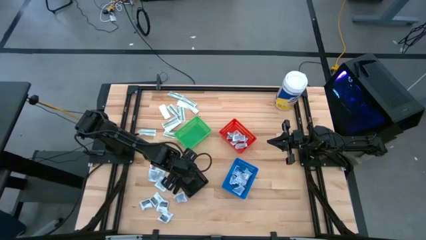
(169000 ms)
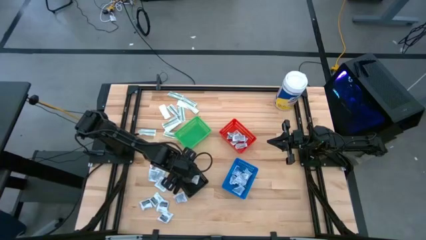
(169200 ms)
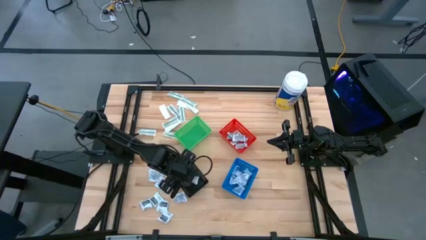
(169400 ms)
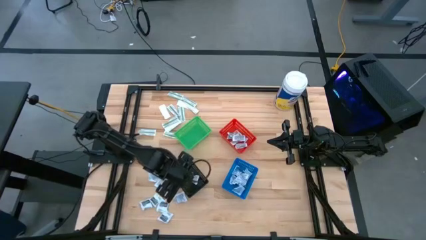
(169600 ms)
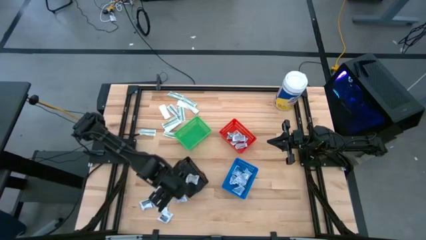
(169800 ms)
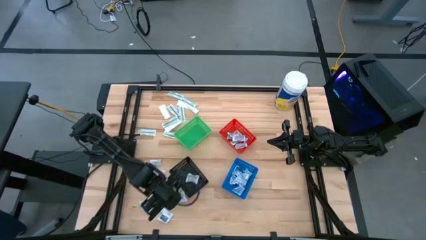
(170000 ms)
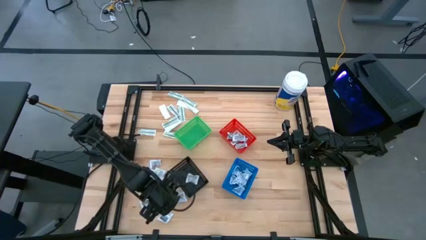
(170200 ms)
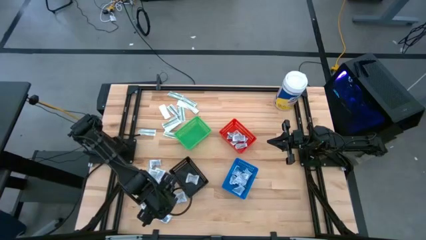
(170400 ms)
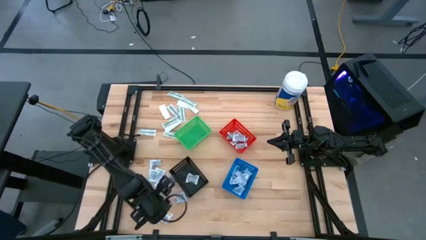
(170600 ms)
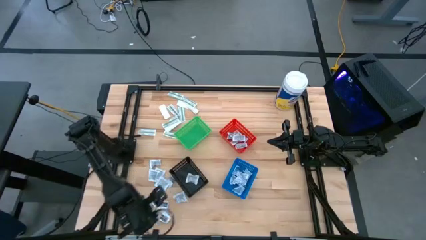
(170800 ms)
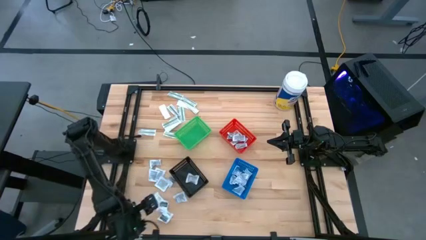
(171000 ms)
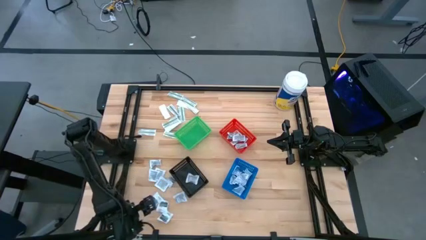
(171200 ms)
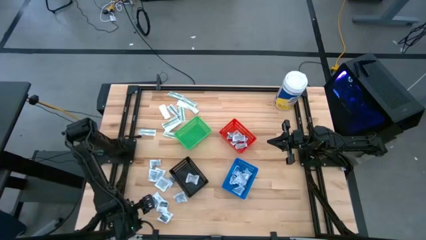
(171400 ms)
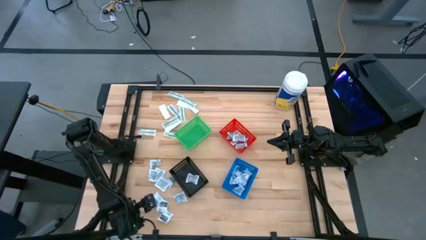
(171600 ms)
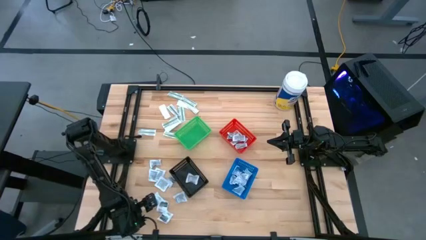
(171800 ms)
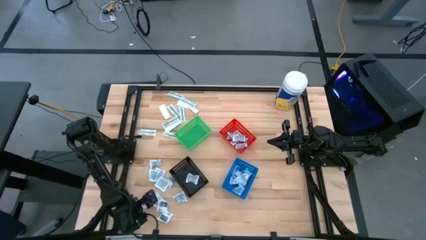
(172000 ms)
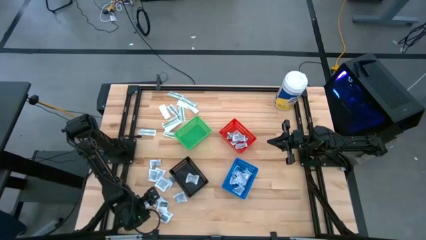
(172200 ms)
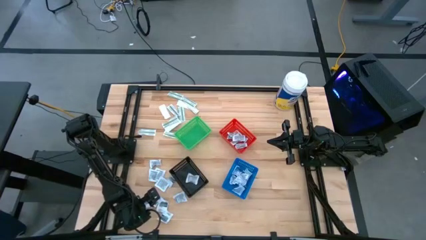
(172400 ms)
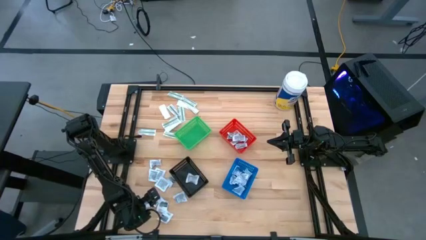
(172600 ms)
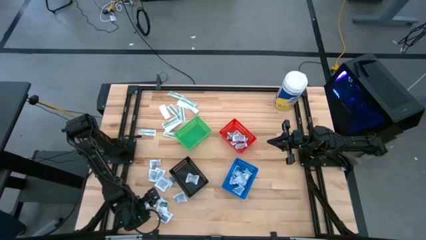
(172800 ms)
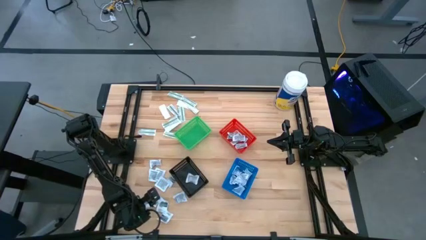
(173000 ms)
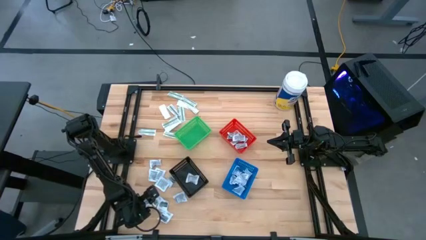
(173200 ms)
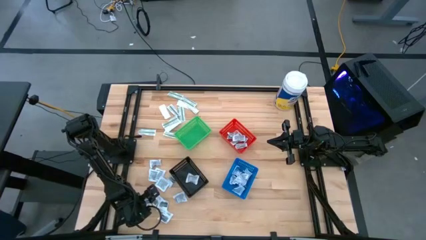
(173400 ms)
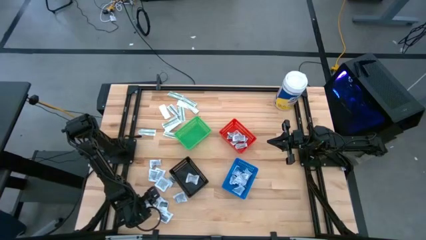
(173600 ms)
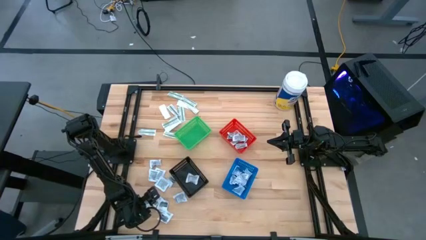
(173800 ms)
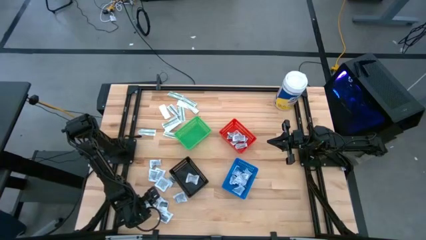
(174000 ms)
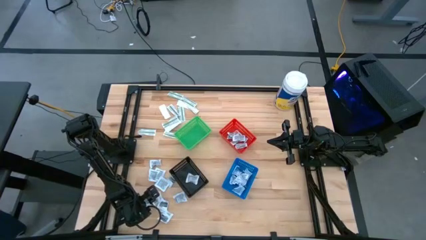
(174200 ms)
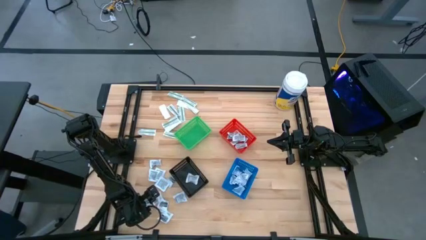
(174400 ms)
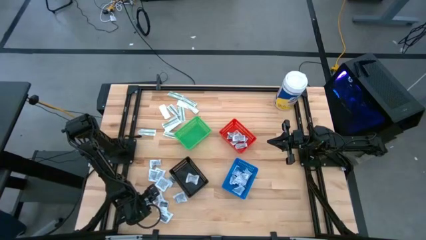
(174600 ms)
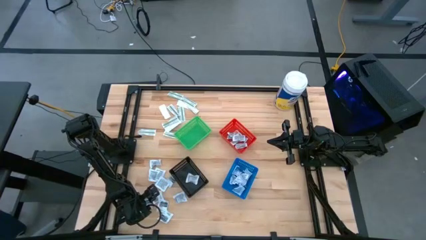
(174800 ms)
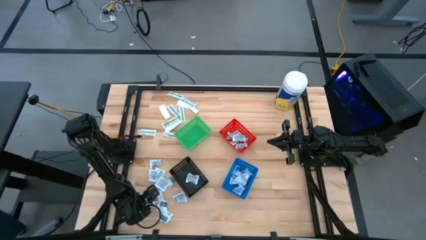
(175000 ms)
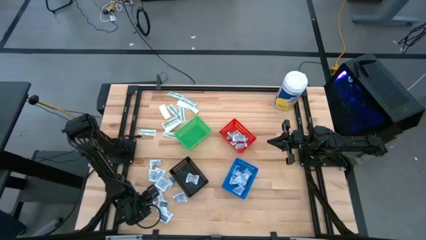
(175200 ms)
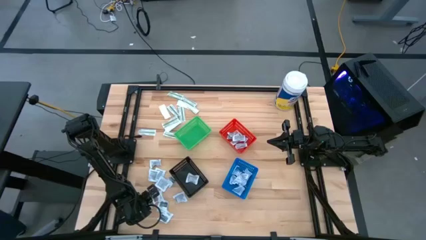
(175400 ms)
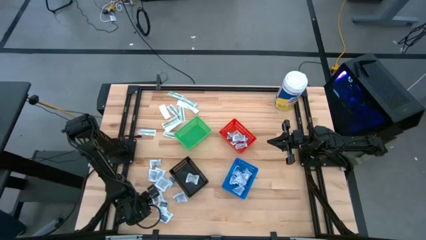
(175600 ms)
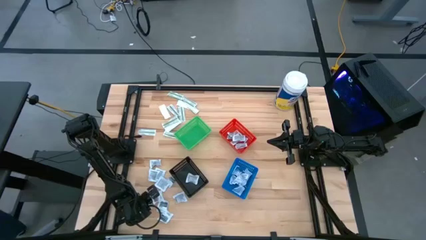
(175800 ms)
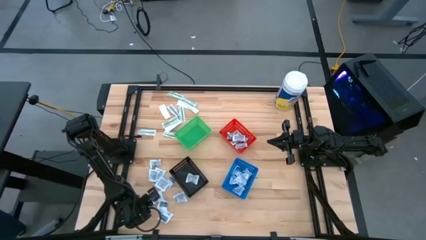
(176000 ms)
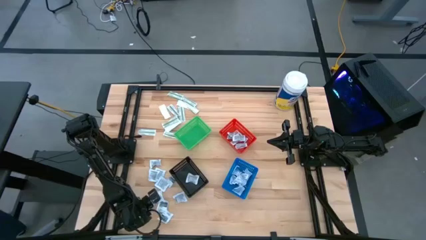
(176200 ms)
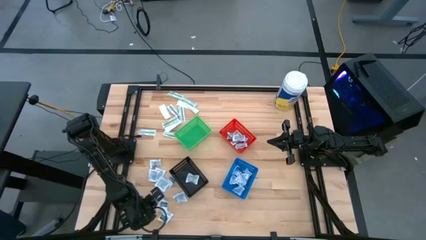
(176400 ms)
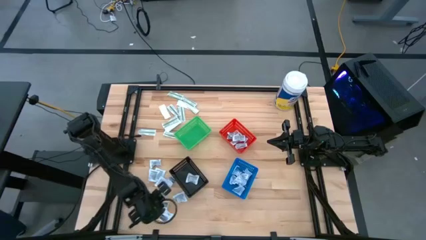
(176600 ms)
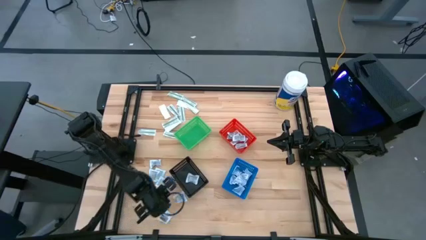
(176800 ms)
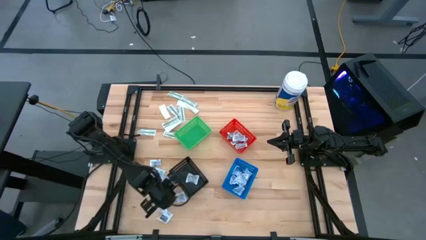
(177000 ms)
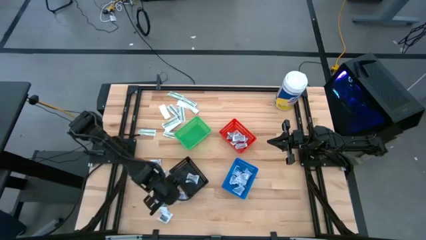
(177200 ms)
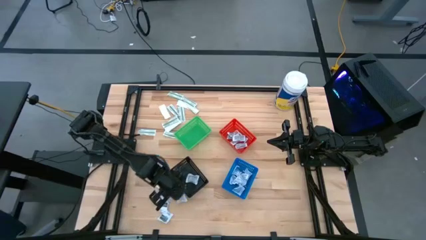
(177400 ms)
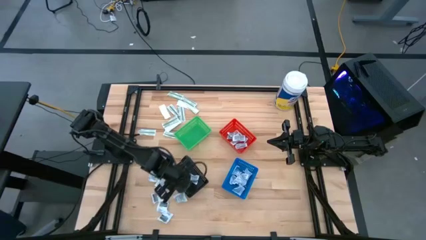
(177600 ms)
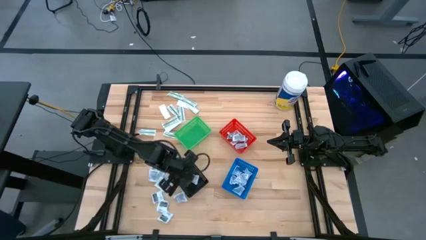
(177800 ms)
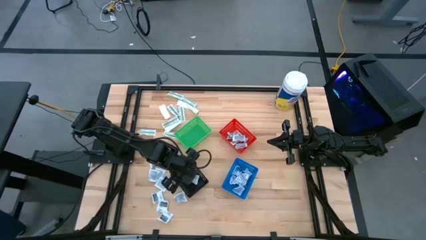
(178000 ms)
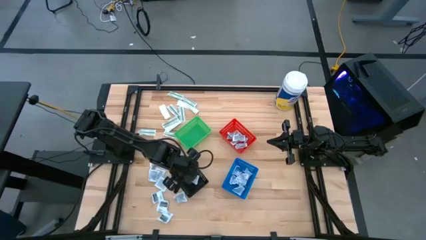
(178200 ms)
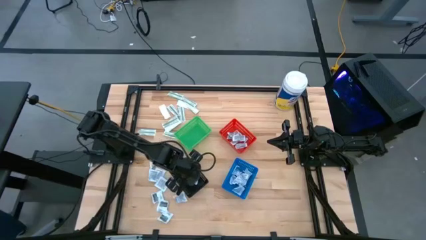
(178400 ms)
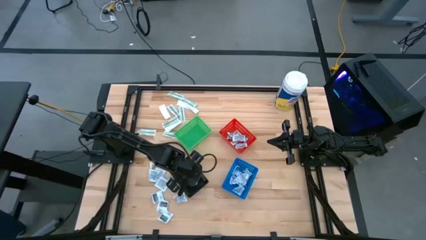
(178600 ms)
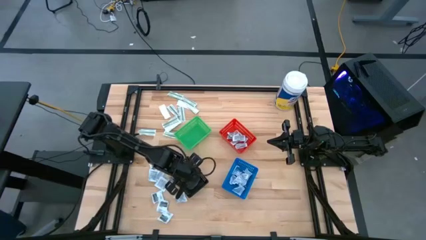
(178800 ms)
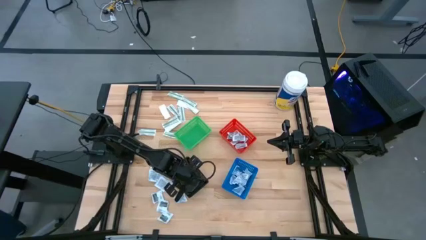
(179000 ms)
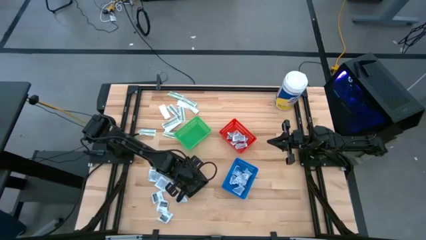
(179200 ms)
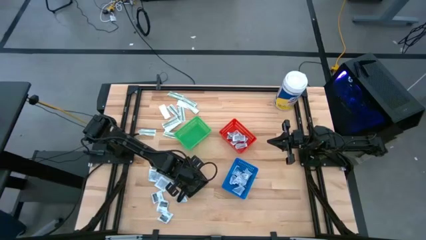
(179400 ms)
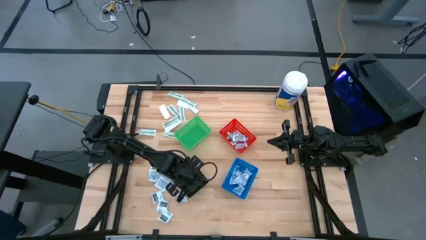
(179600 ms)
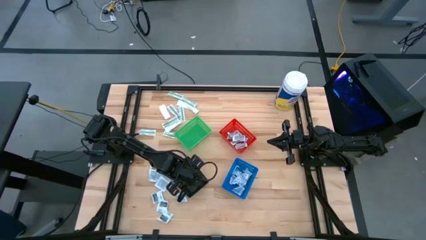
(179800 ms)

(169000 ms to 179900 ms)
Task: Pick & Place First Aid Supplies
Put the black towelette pack into the black bin
